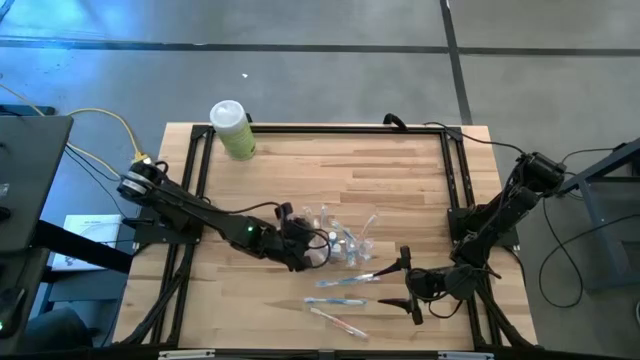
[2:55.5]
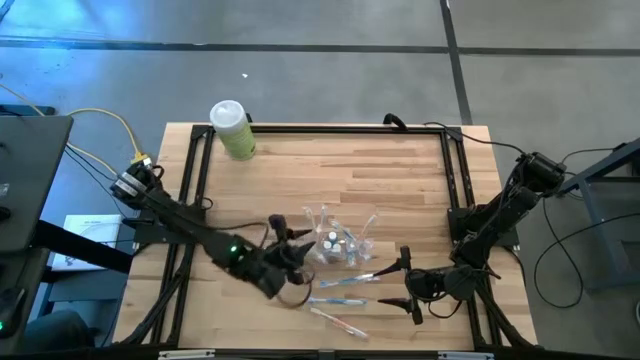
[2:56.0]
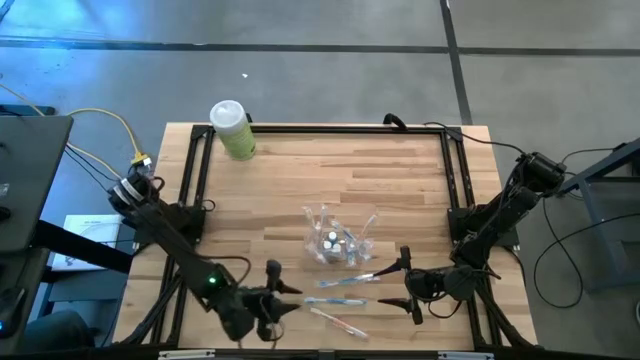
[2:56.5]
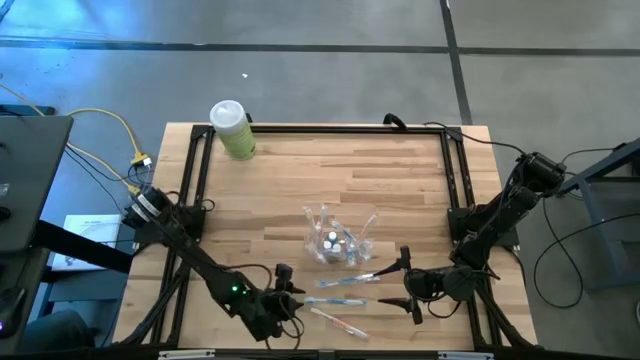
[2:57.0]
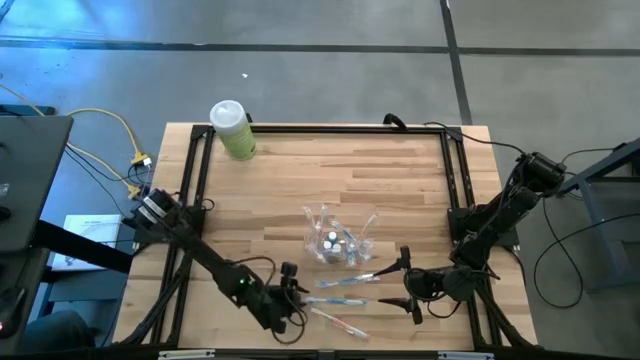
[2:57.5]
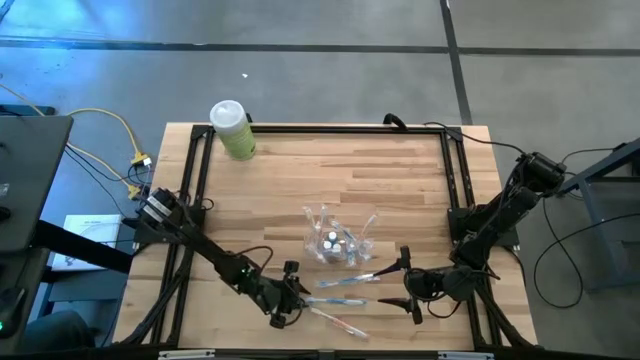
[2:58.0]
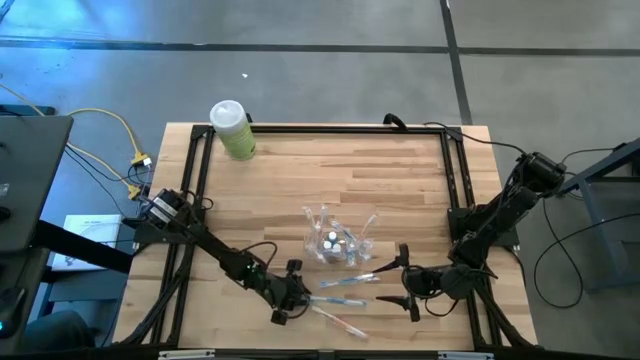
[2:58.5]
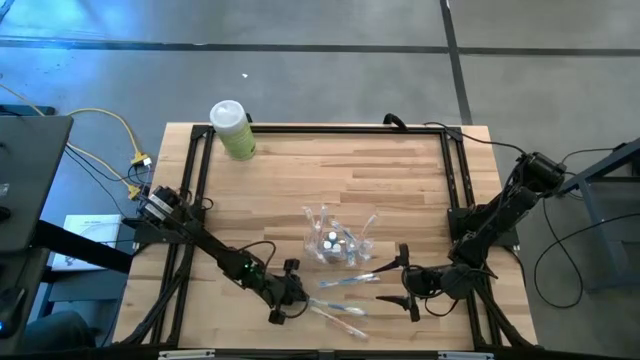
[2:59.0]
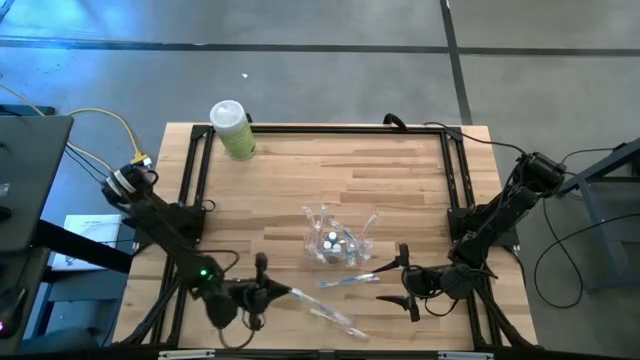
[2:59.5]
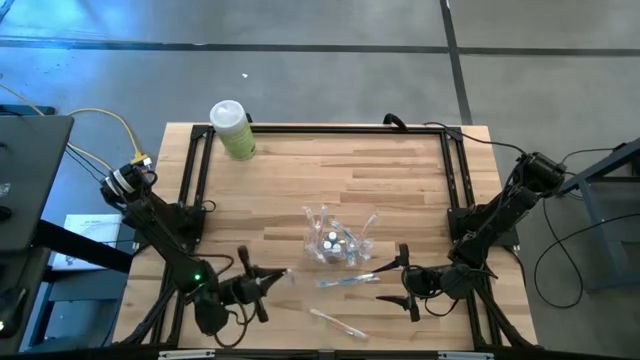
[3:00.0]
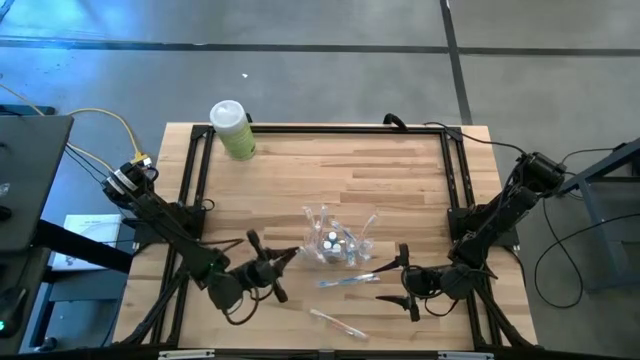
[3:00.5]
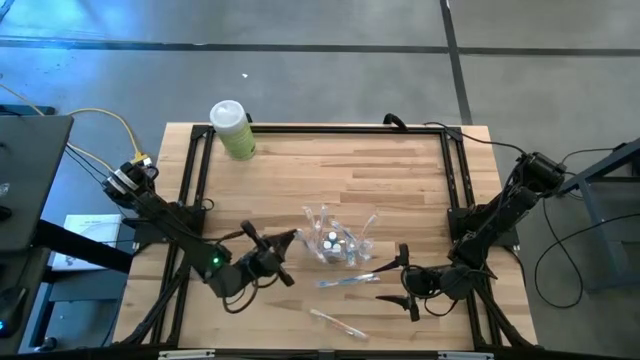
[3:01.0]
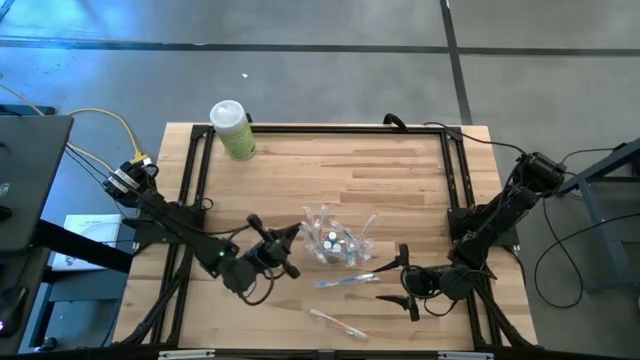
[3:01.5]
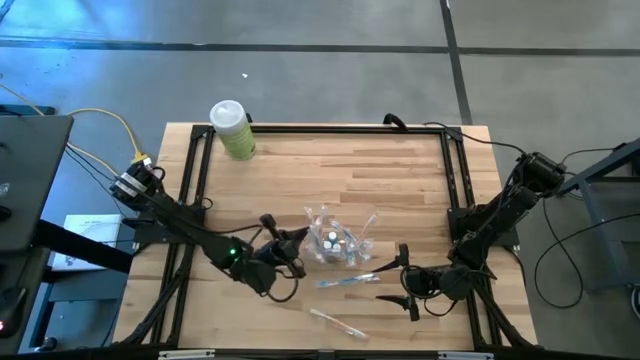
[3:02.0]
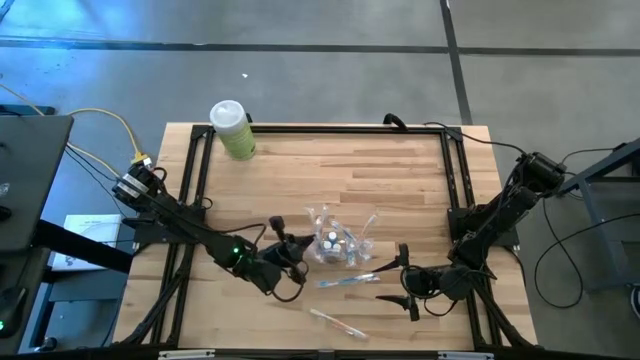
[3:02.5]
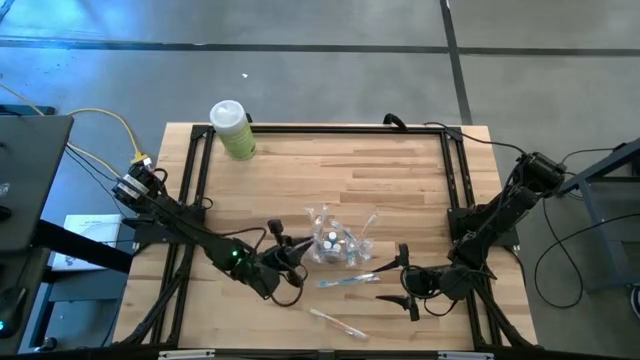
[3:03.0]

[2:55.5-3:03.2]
Task: Pick & Place toothbrushing station
Put the blue toothbrush into the transparent organizer

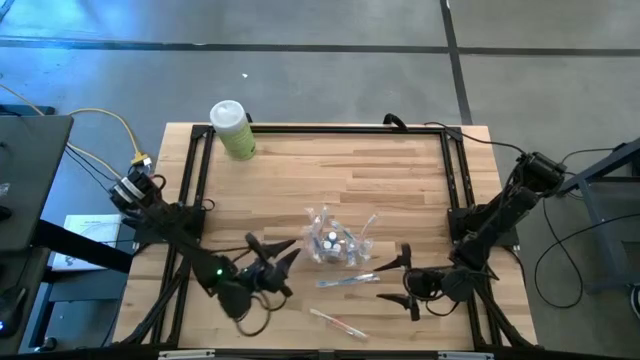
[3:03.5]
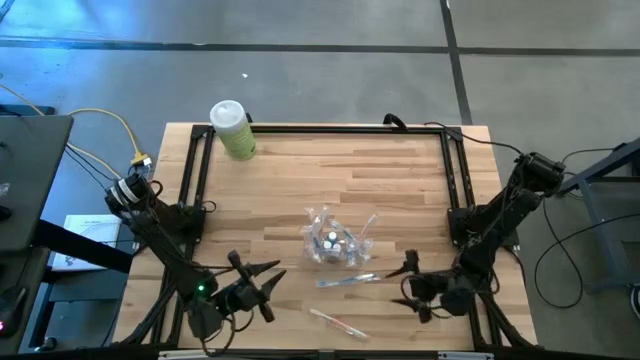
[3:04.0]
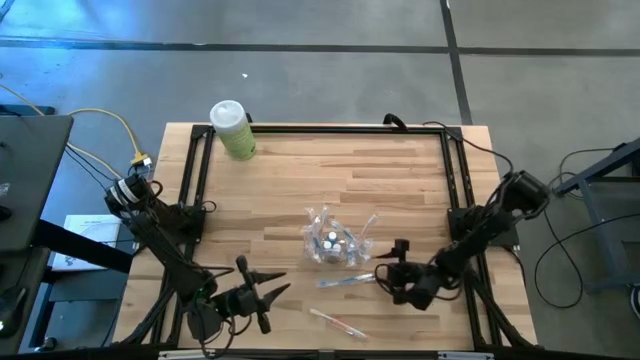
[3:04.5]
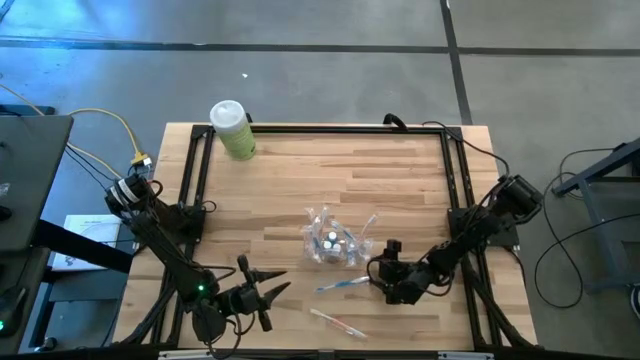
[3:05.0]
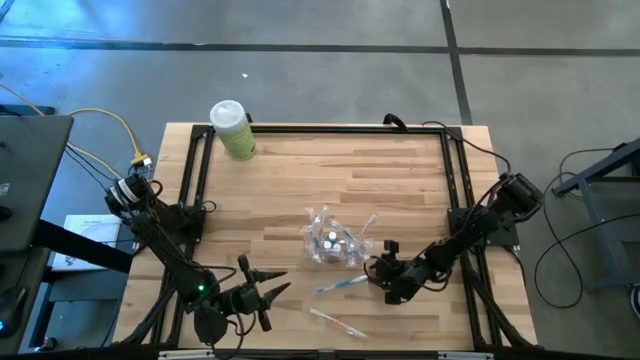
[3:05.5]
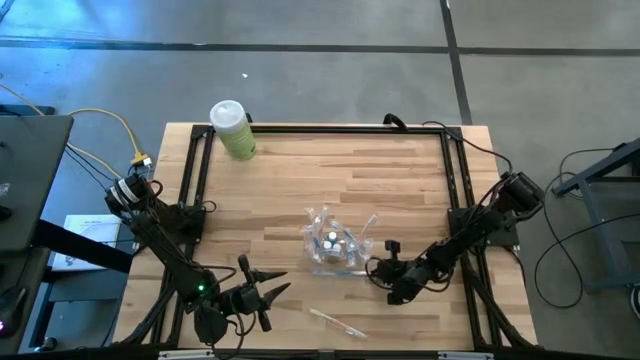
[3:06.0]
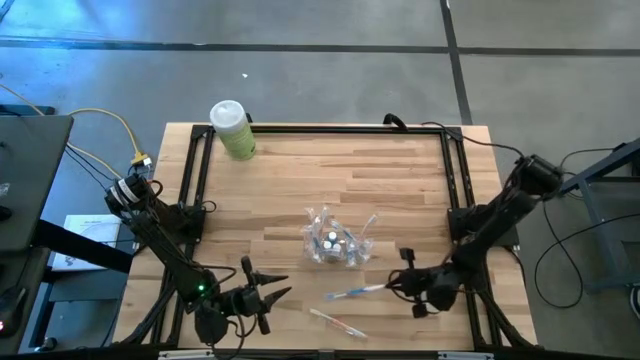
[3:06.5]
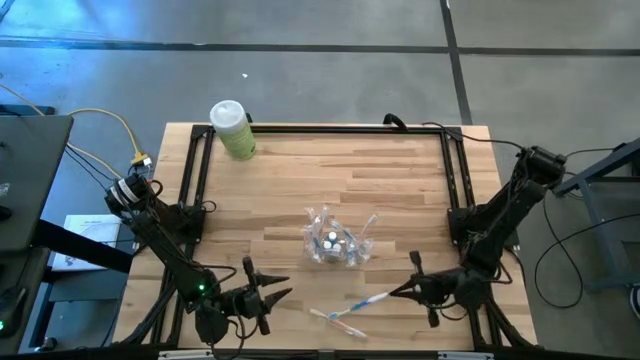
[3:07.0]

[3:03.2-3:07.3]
Put the blue toothbrush into the transparent organizer

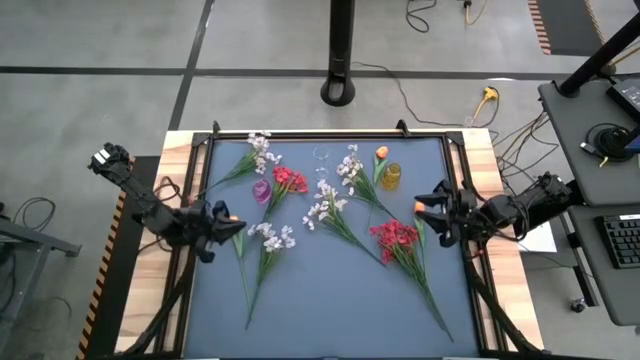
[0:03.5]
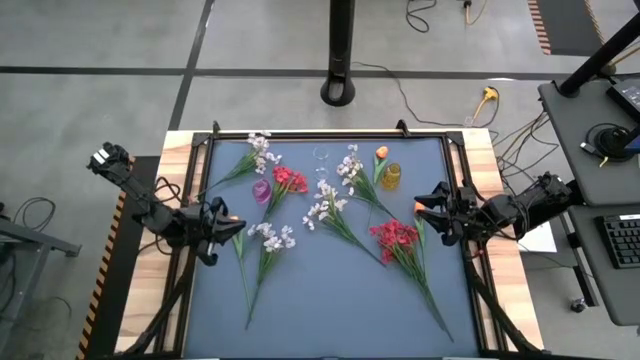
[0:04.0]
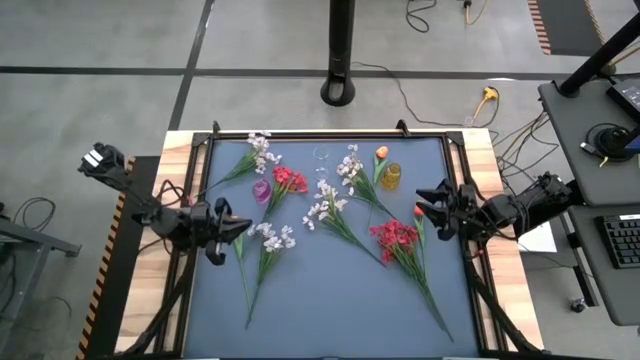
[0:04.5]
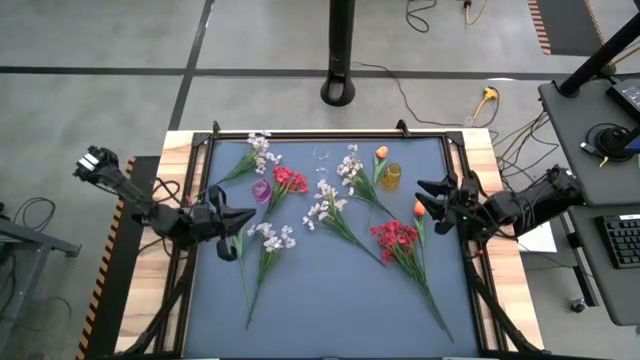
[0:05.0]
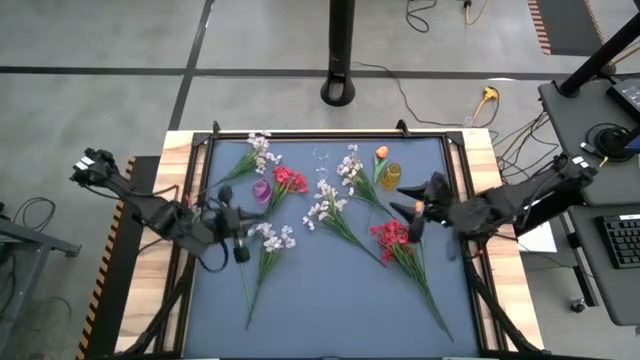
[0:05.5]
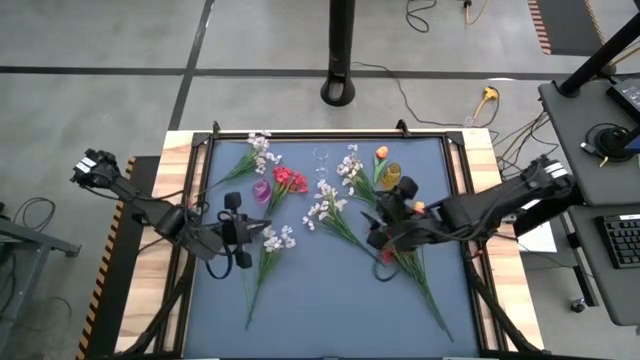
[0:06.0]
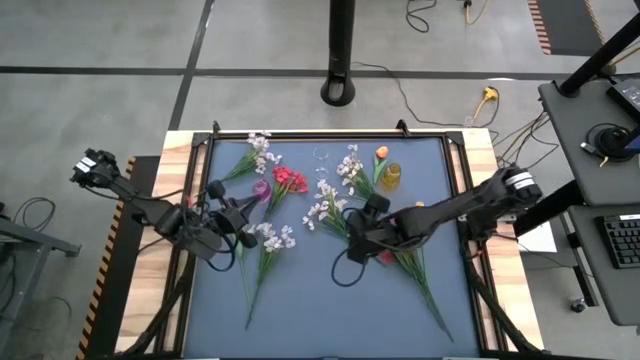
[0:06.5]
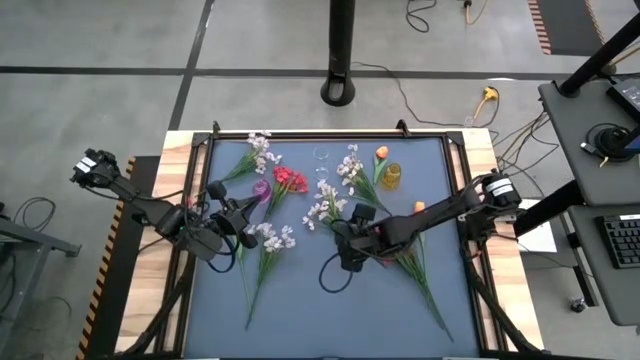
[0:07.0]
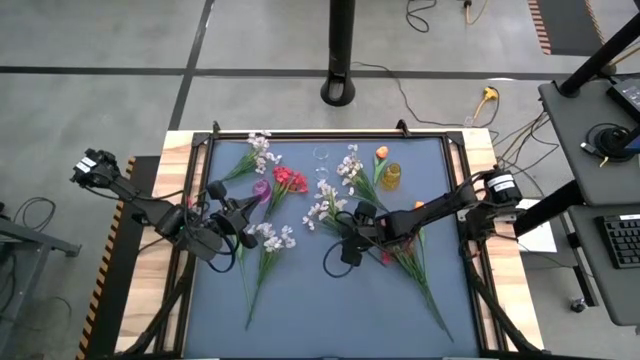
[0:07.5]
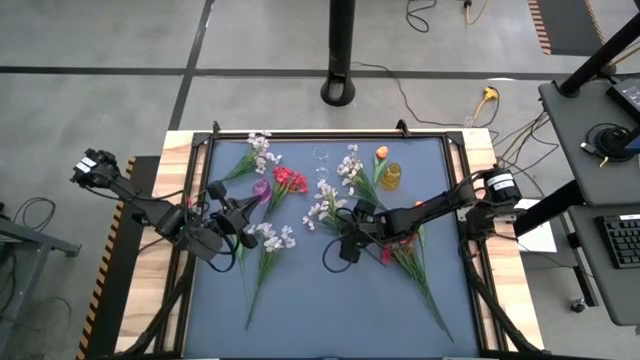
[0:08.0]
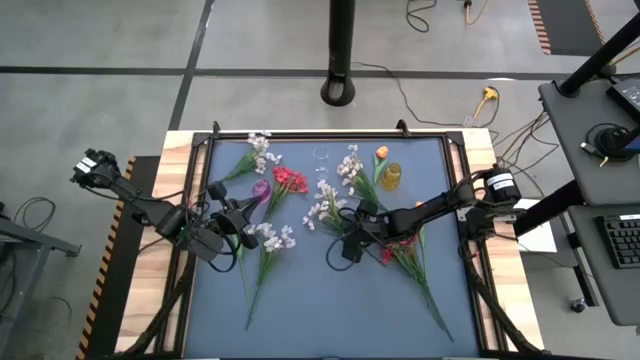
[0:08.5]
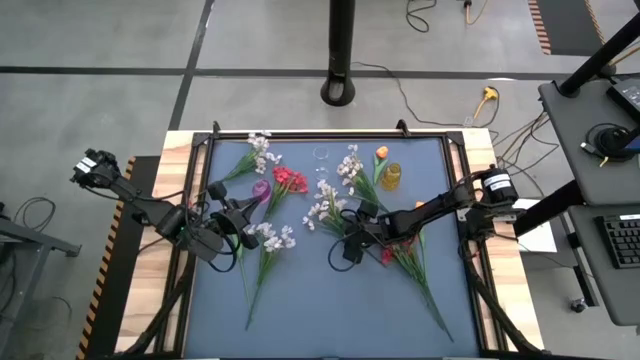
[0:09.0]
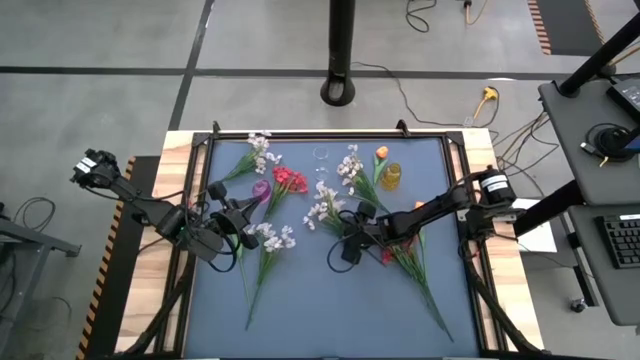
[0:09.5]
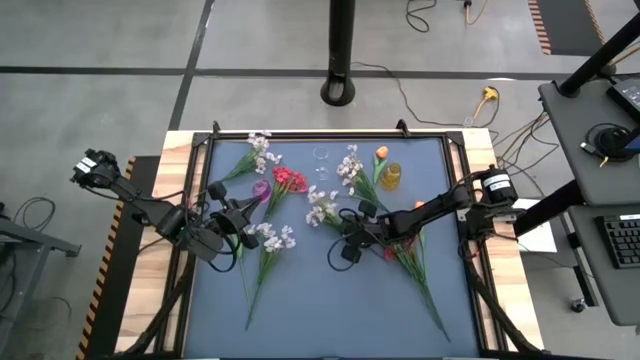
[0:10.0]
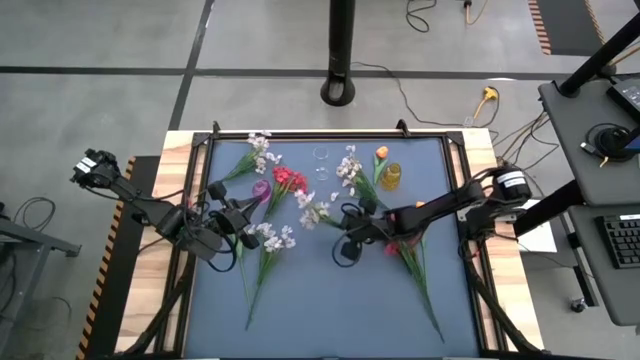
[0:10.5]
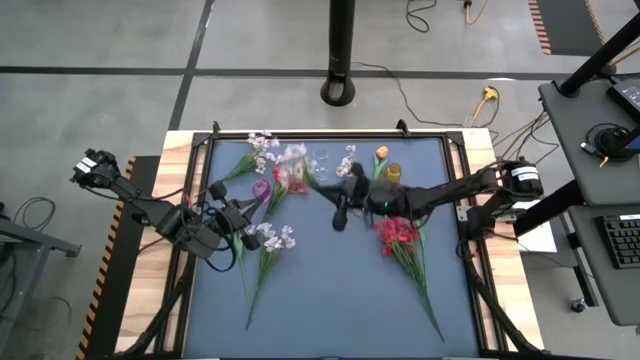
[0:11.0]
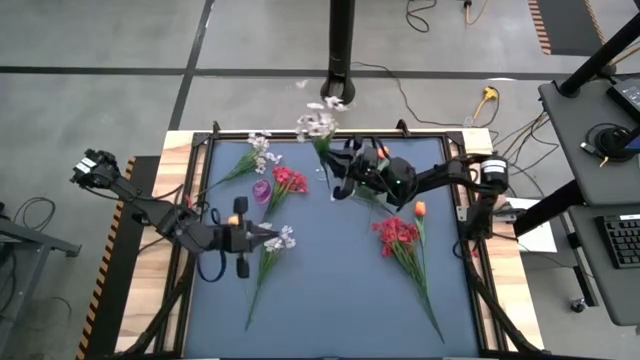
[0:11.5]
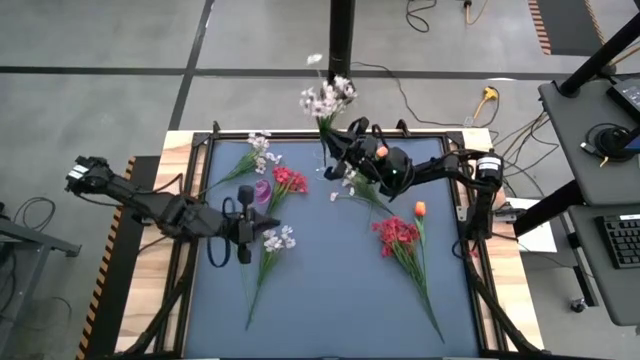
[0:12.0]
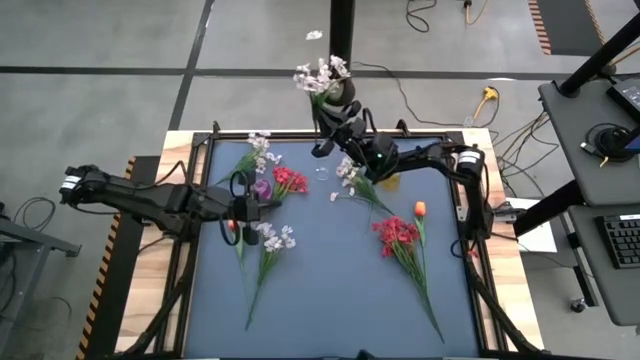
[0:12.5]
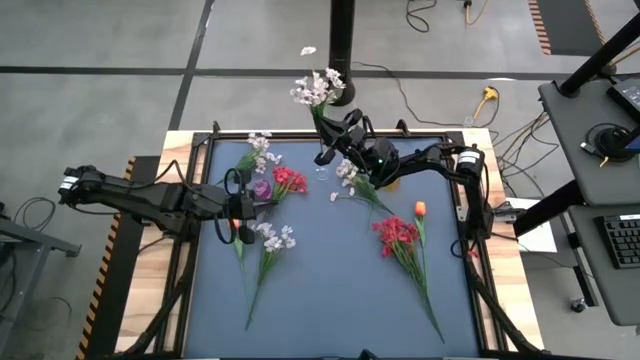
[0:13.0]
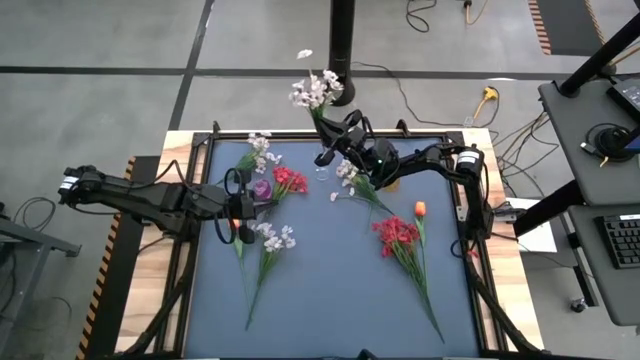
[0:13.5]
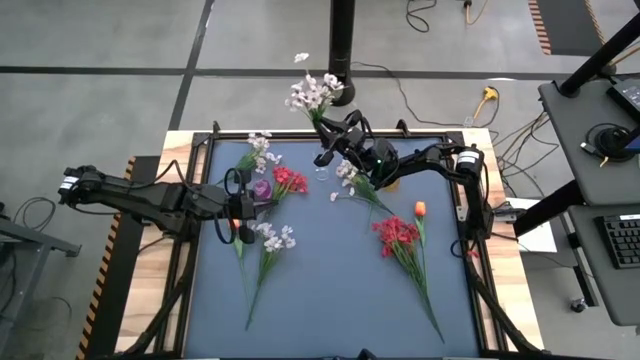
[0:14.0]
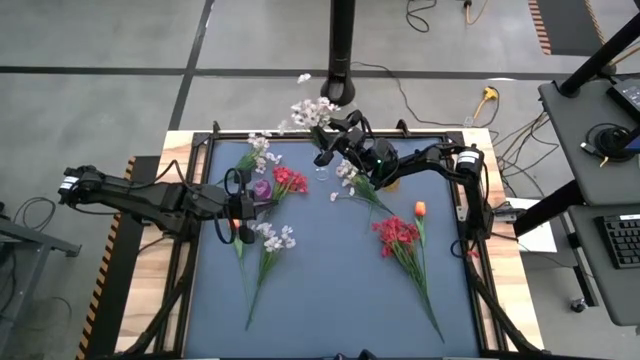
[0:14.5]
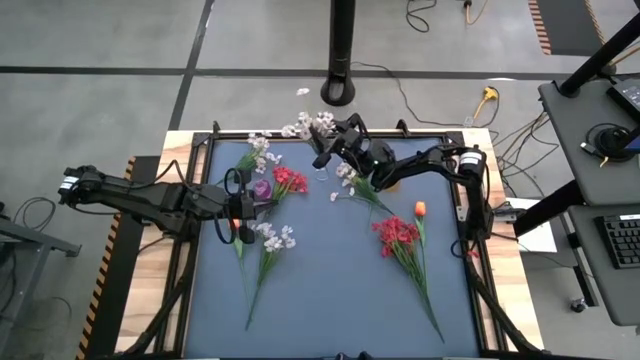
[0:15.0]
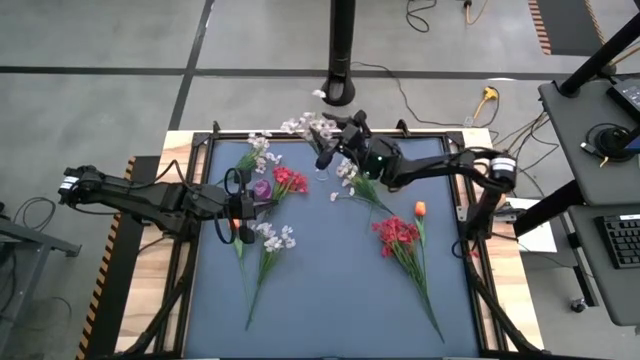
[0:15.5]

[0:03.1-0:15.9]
Task: Sort flowers into vase by color
Put the white flower into the transparent vase
